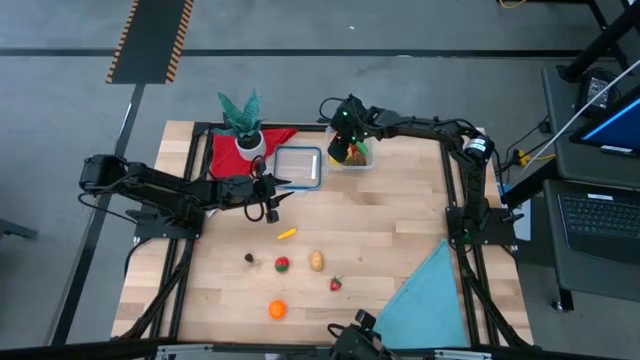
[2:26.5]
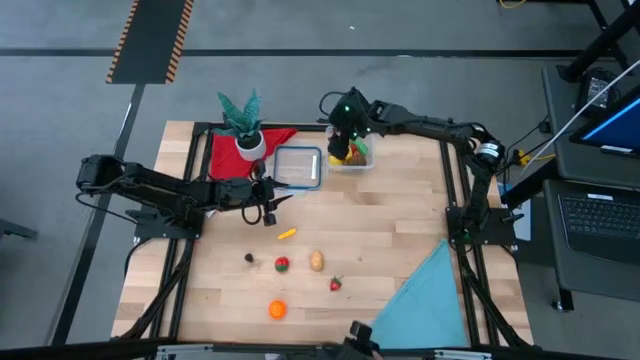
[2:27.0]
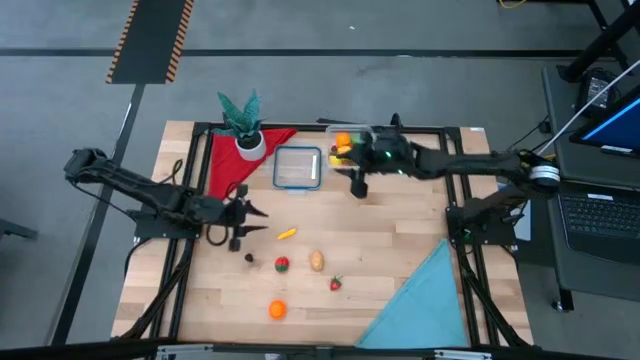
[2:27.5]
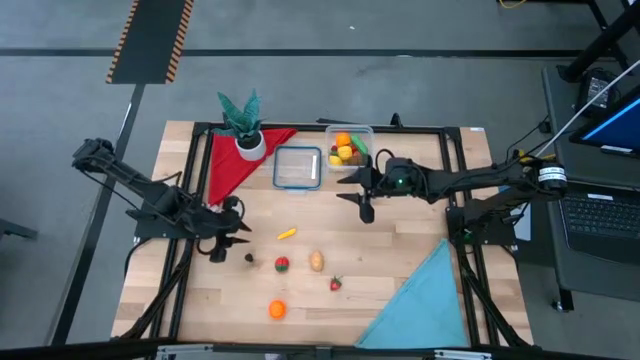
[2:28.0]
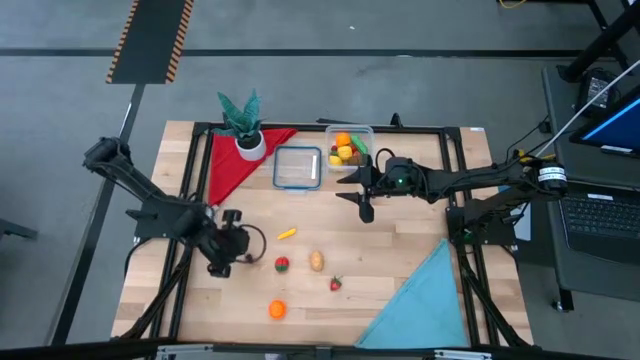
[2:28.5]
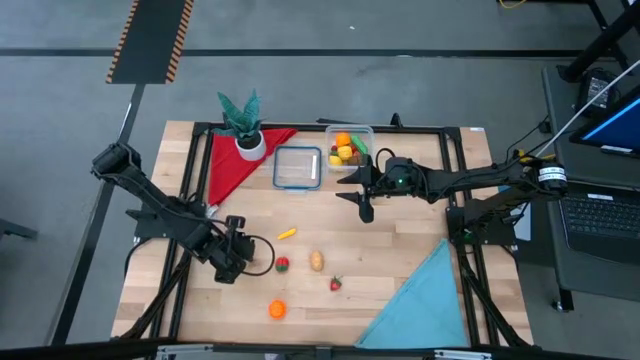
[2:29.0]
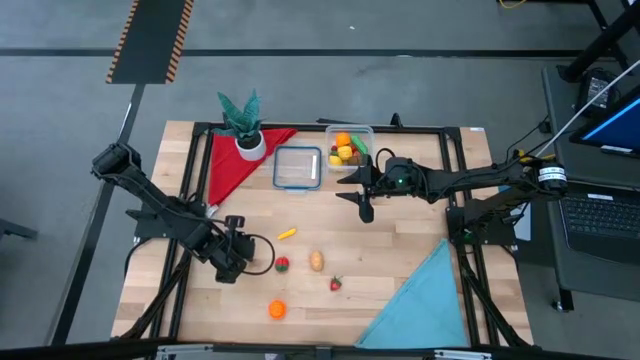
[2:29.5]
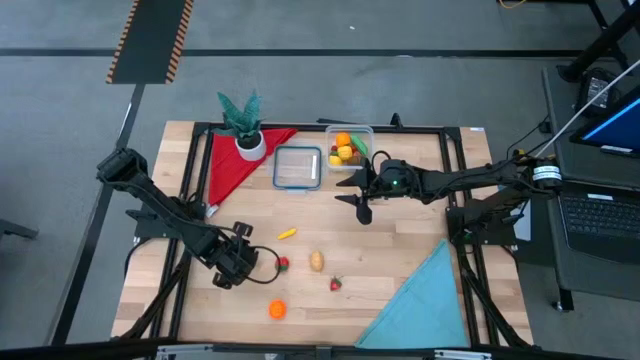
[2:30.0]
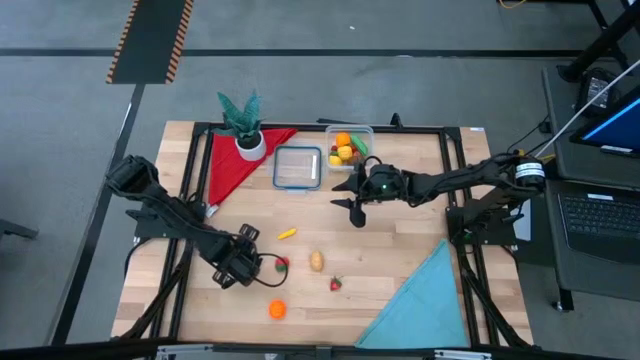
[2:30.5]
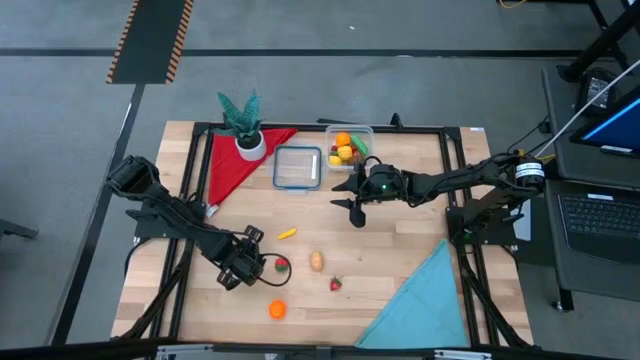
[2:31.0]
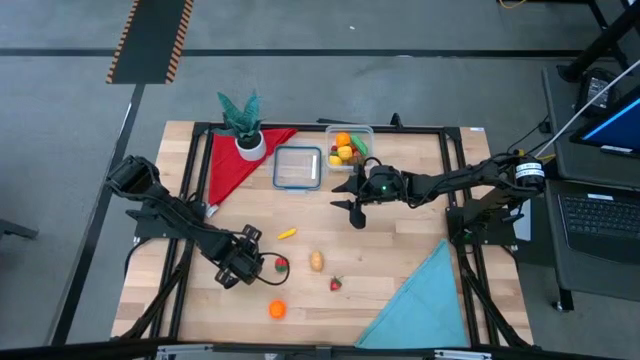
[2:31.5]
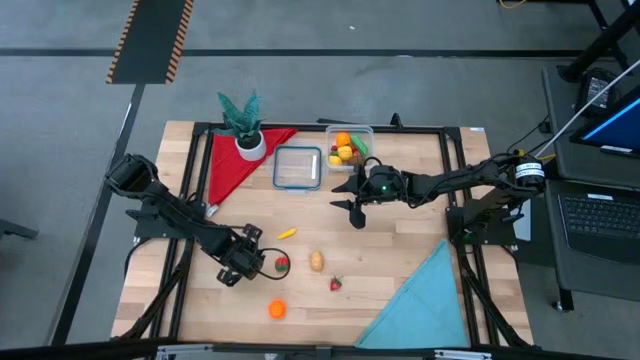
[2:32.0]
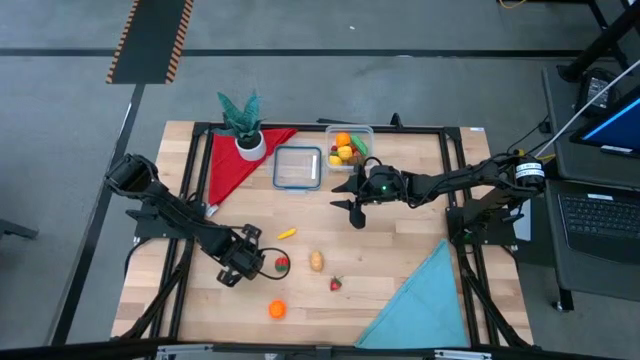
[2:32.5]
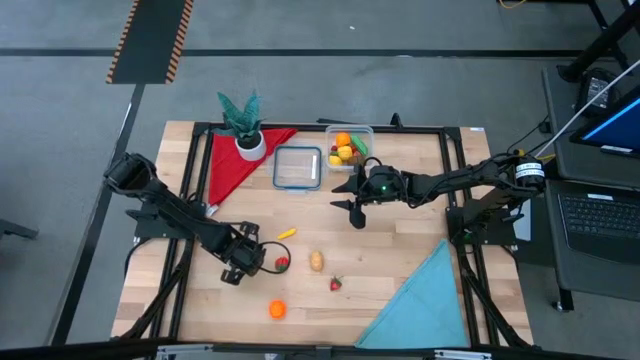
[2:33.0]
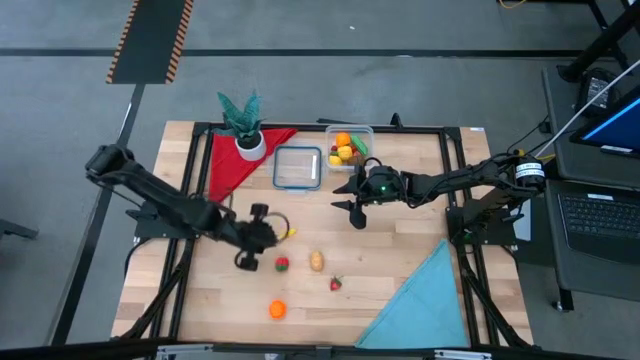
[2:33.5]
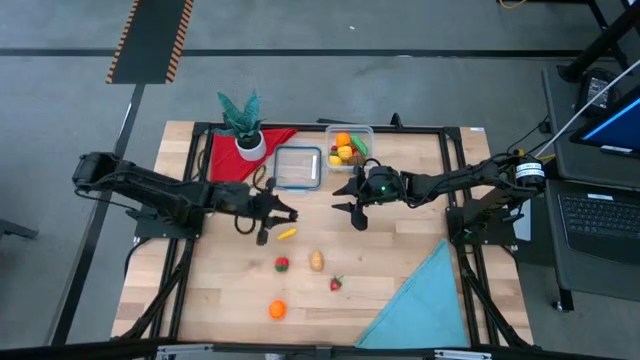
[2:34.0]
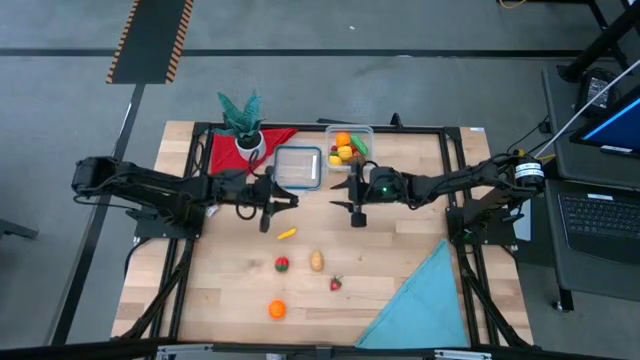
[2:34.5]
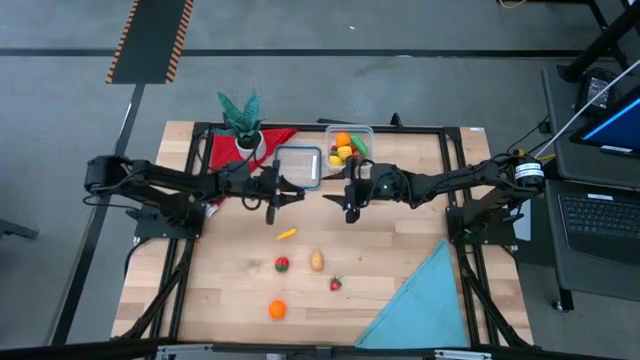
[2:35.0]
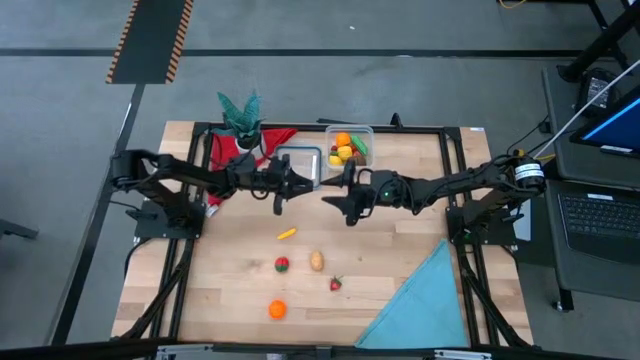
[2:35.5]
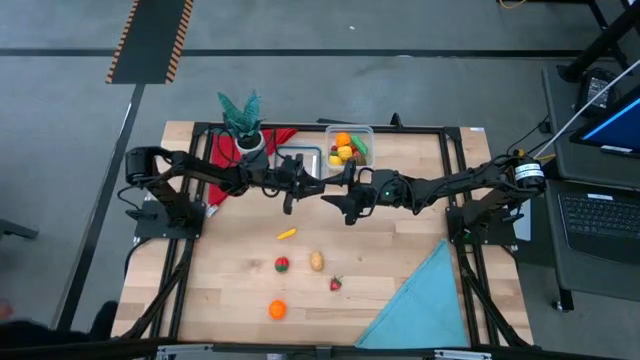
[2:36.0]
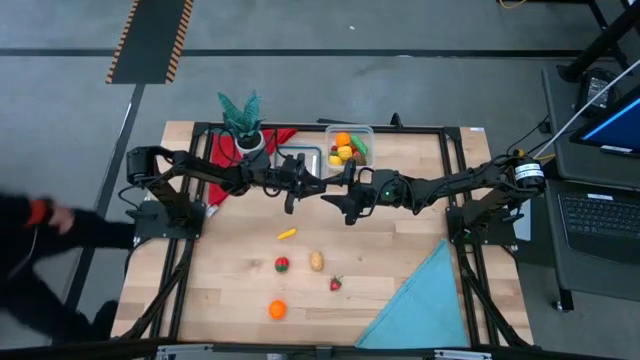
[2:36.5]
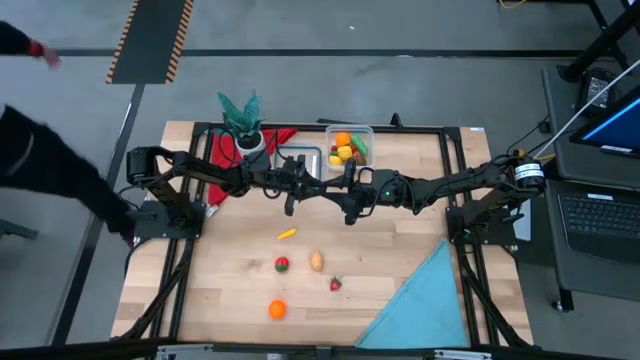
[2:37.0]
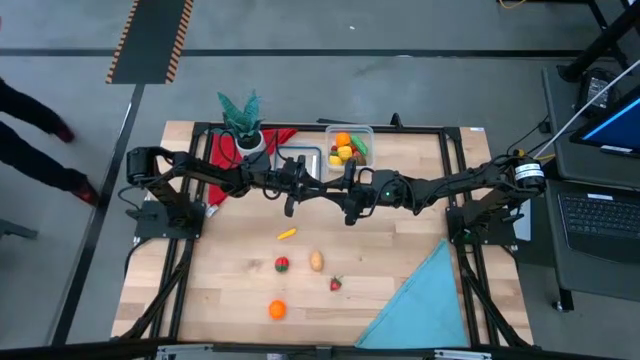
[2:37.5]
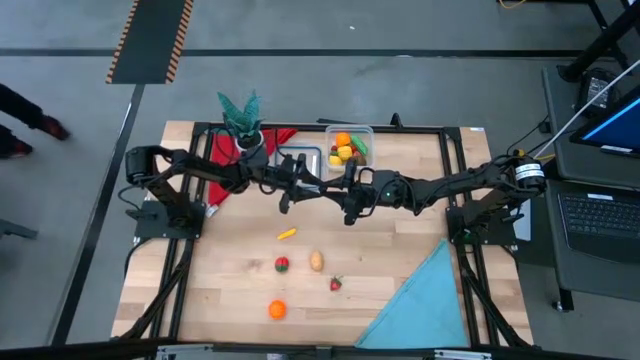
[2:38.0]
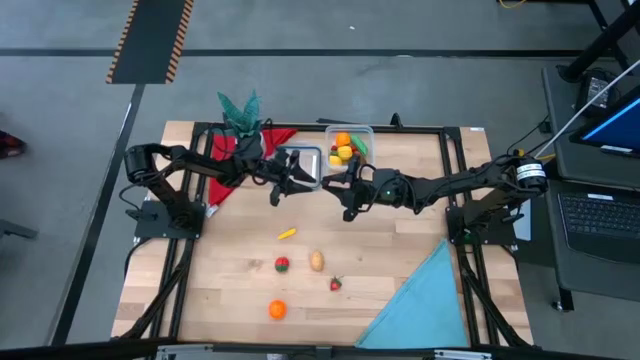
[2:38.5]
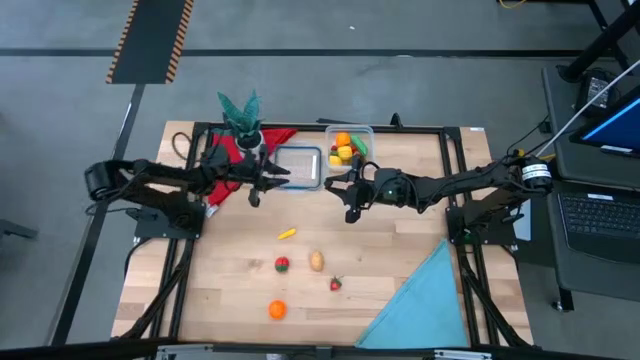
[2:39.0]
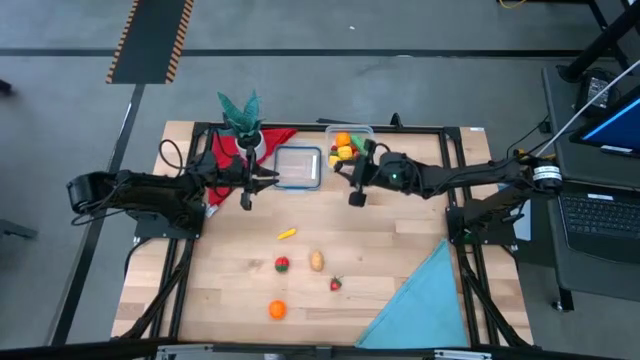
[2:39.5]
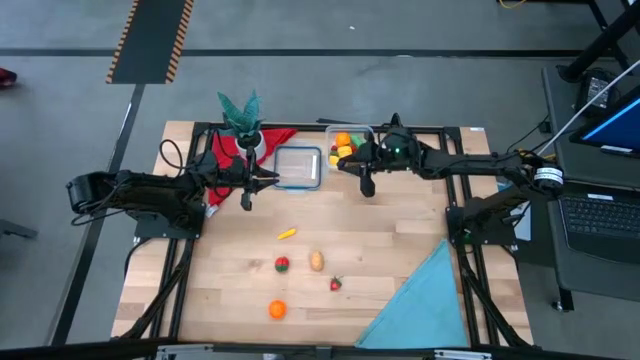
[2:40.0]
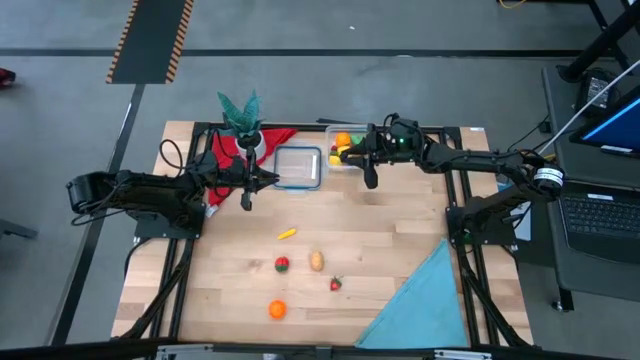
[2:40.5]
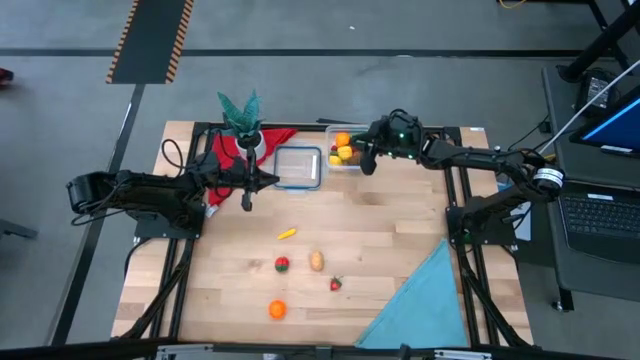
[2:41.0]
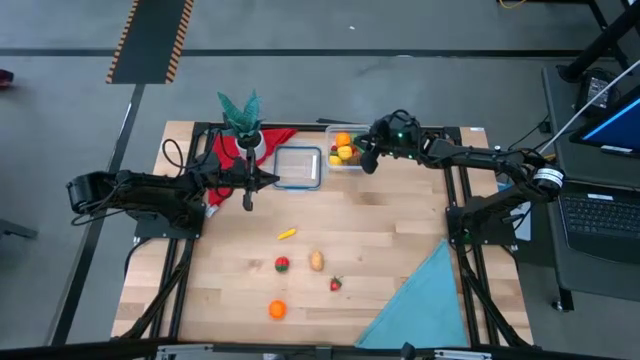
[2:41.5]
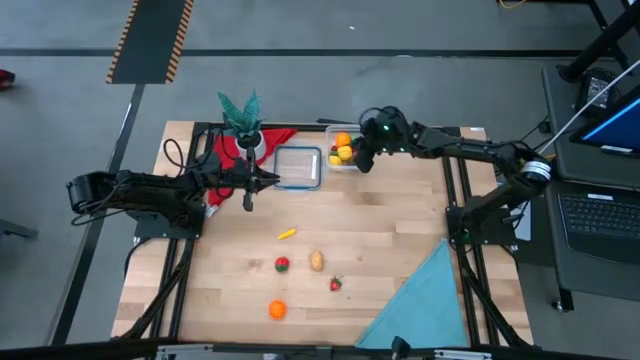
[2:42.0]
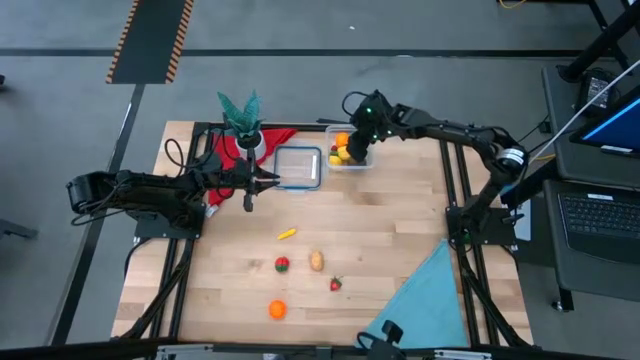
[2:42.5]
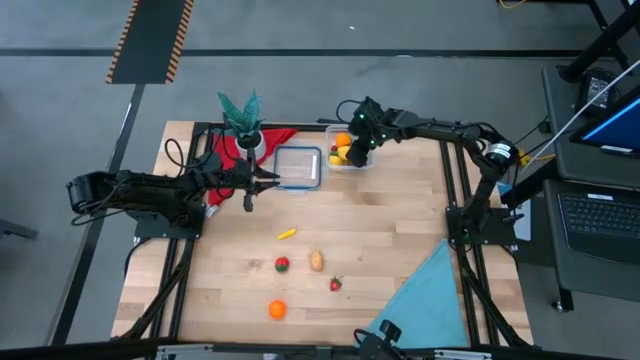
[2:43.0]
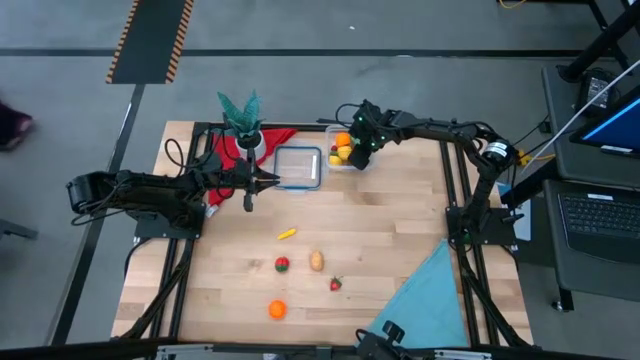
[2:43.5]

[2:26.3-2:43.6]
Task: Pick and placing Produce into tupperware
Put the blackberry into the transparent bin

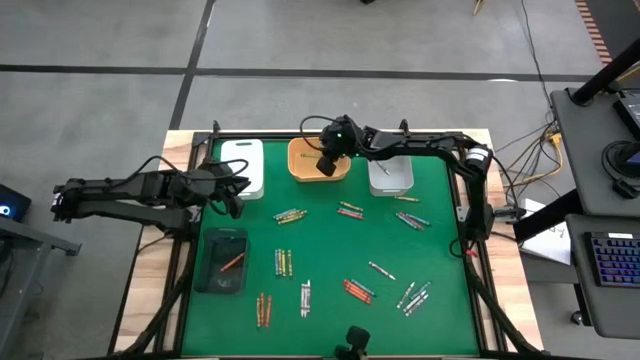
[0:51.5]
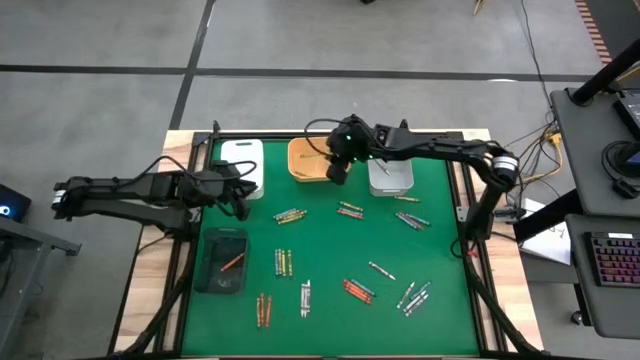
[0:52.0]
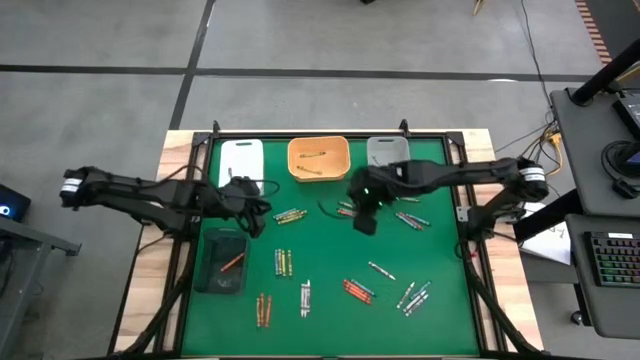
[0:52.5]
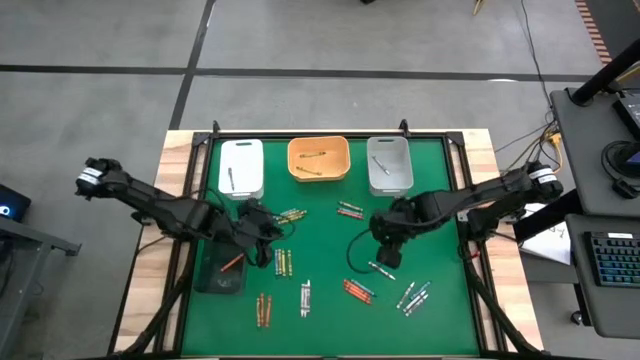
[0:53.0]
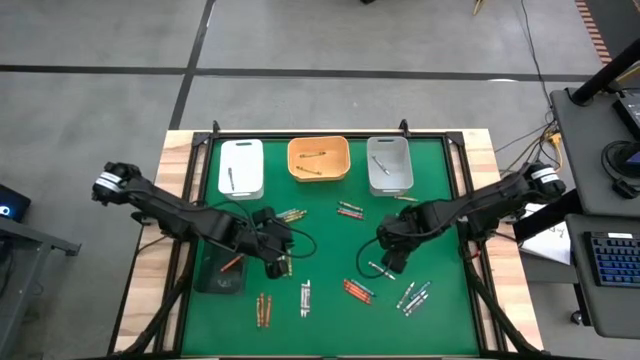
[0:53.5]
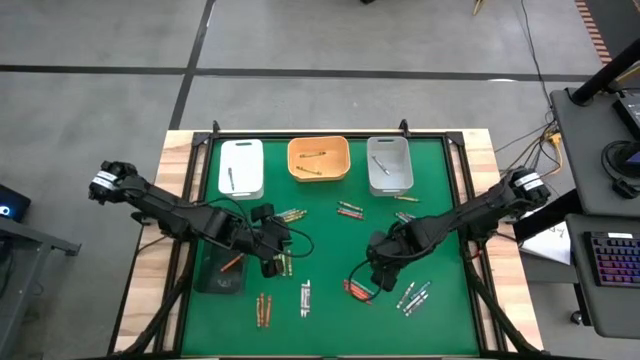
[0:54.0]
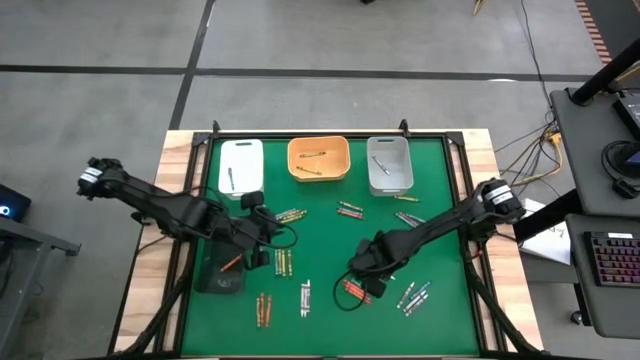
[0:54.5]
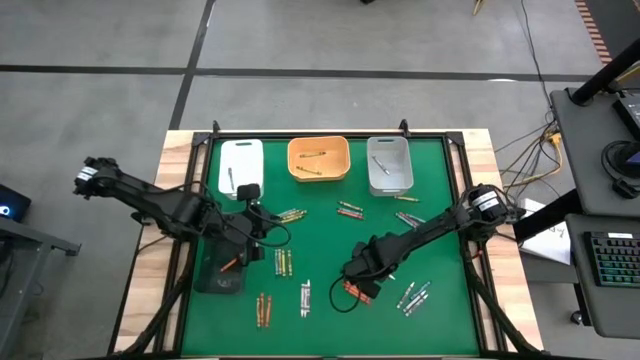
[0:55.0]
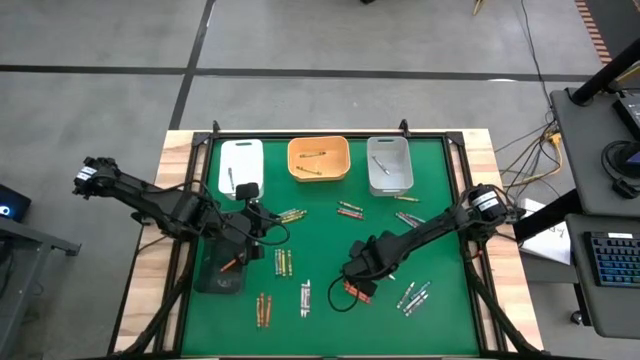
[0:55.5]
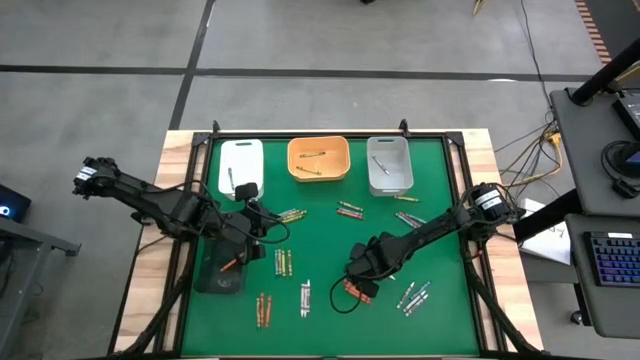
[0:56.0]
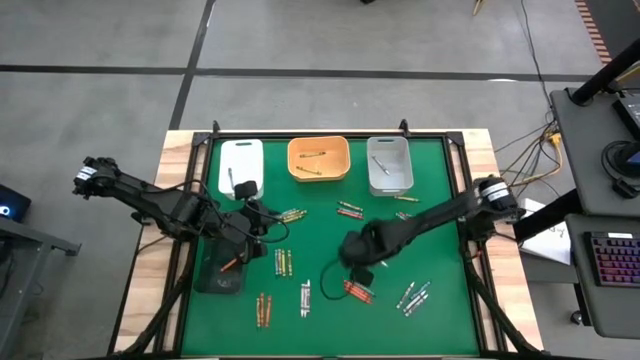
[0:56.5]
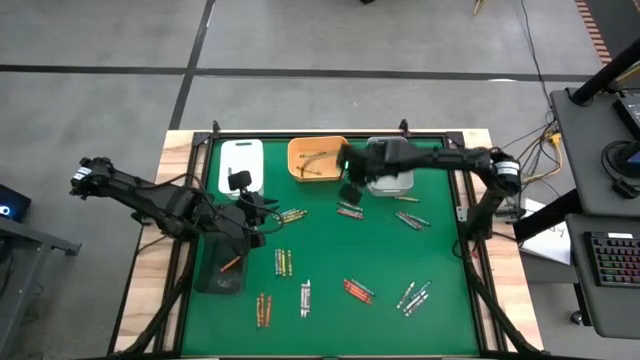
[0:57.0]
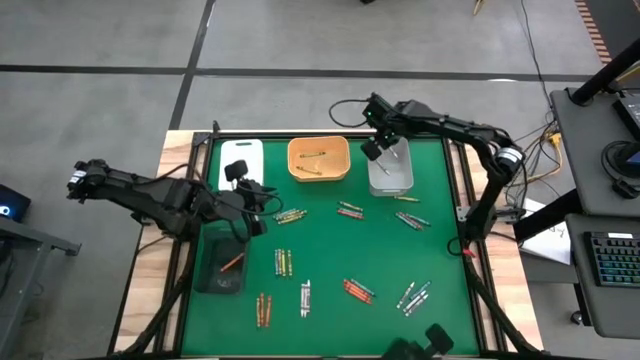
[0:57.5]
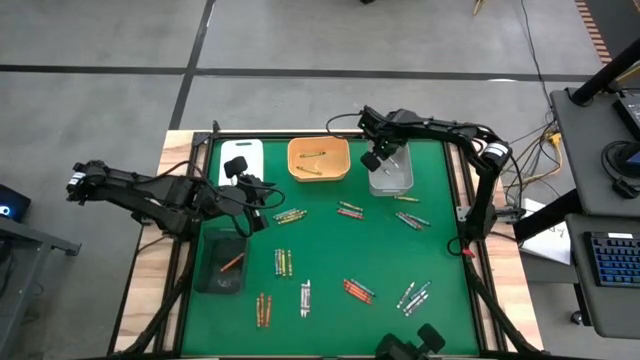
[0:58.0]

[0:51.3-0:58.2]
Task: Sort crayons
Put the white crayon into the gray bin
